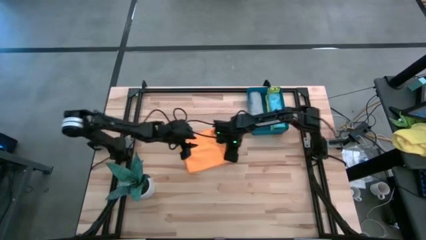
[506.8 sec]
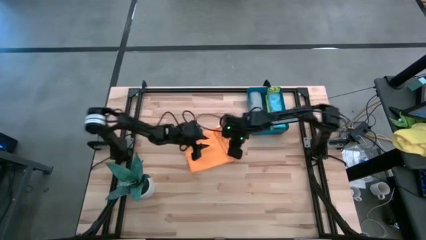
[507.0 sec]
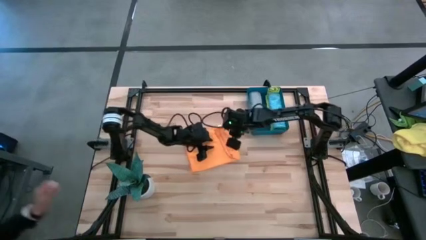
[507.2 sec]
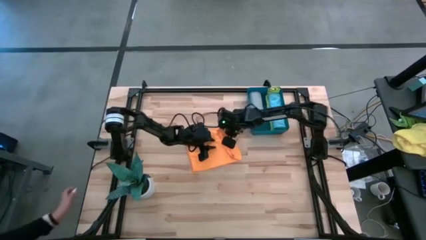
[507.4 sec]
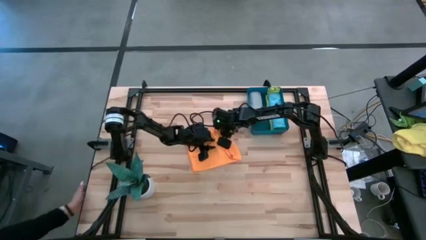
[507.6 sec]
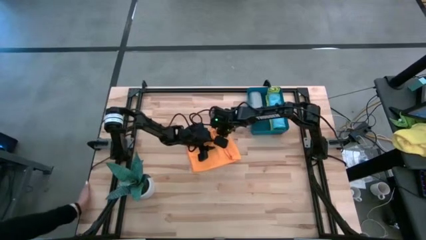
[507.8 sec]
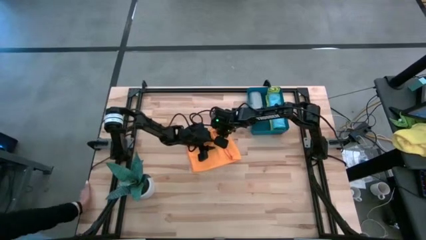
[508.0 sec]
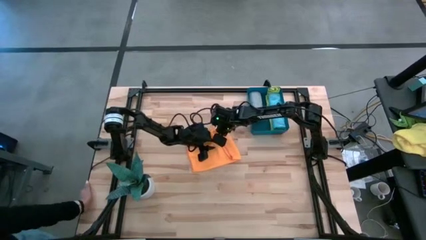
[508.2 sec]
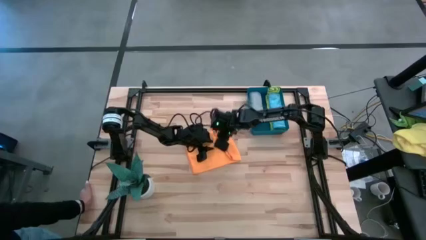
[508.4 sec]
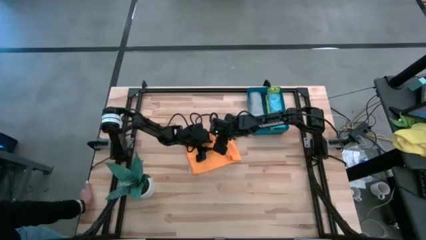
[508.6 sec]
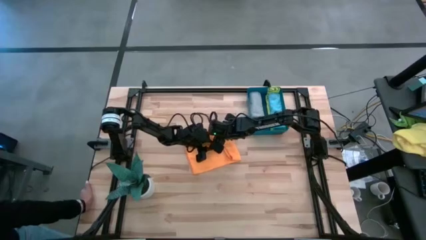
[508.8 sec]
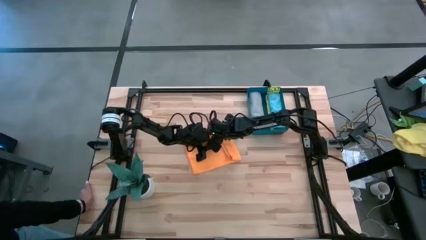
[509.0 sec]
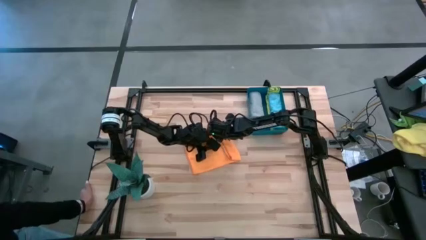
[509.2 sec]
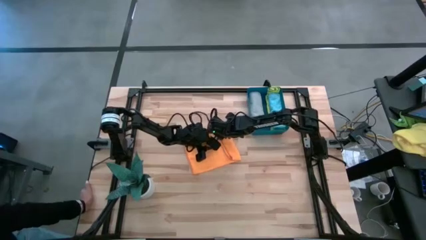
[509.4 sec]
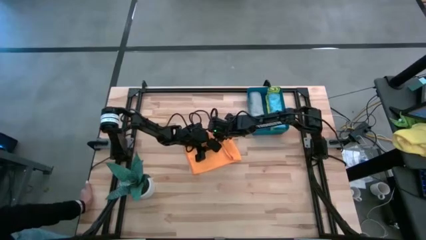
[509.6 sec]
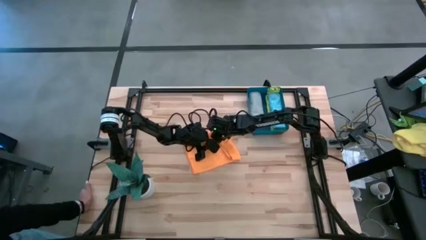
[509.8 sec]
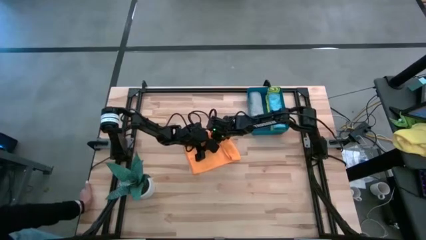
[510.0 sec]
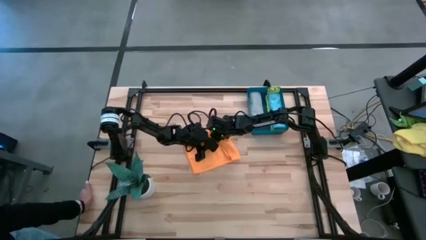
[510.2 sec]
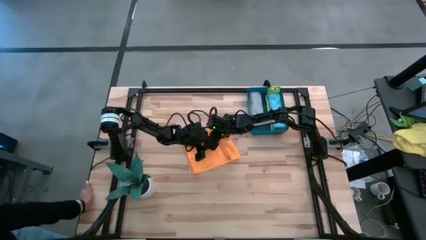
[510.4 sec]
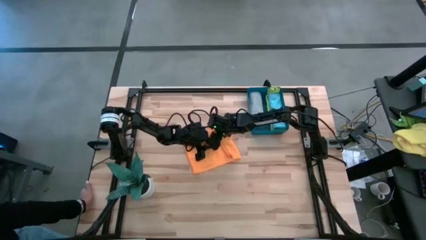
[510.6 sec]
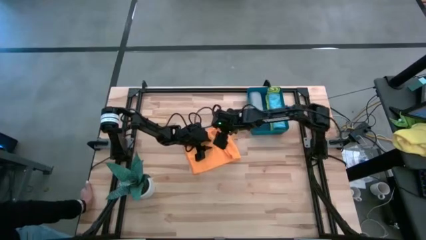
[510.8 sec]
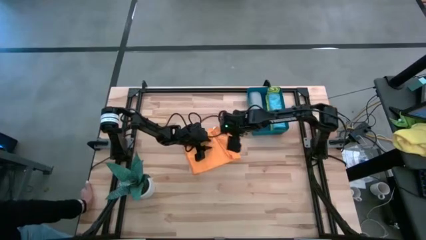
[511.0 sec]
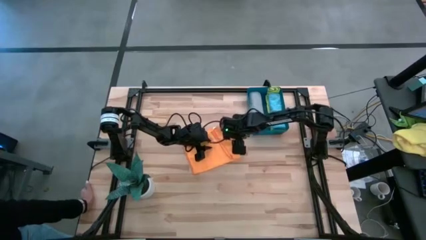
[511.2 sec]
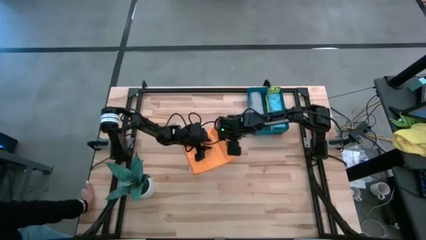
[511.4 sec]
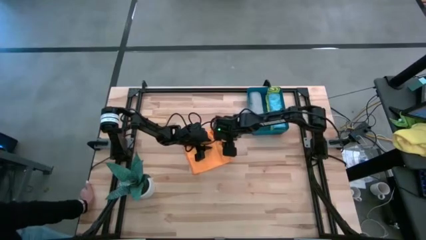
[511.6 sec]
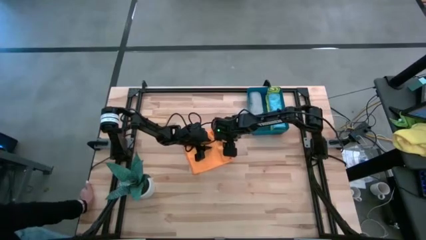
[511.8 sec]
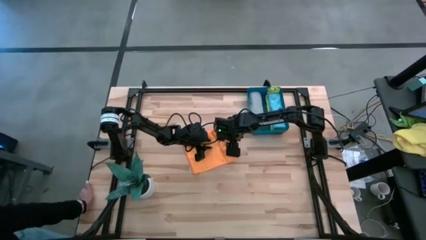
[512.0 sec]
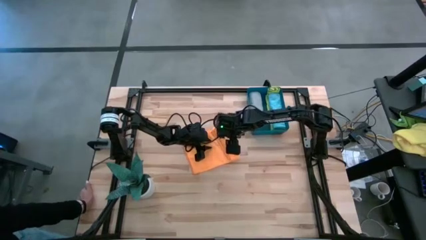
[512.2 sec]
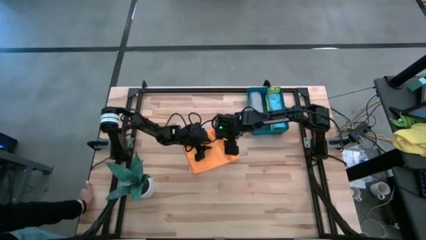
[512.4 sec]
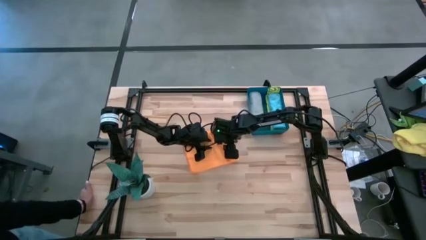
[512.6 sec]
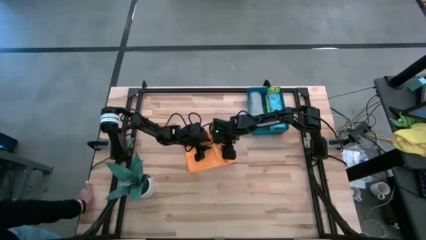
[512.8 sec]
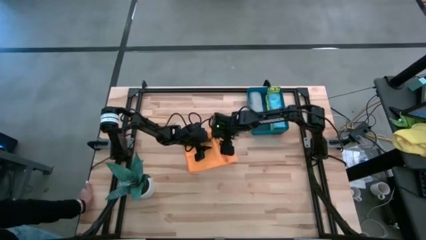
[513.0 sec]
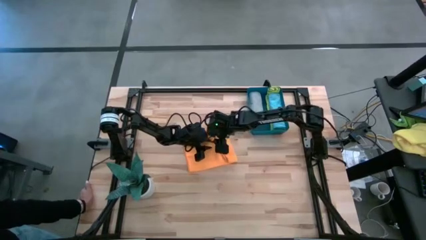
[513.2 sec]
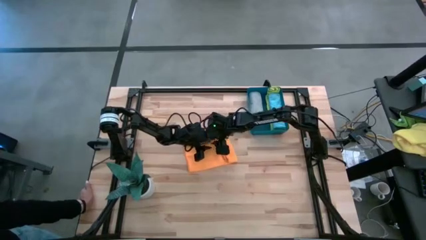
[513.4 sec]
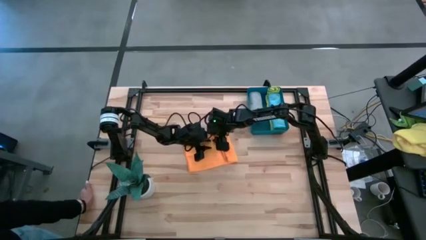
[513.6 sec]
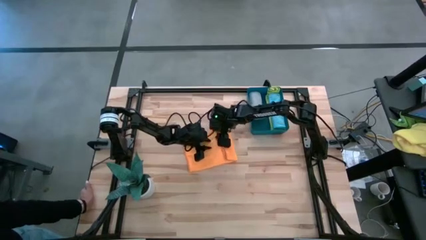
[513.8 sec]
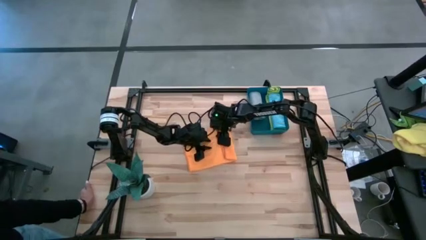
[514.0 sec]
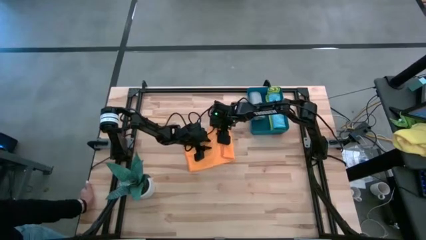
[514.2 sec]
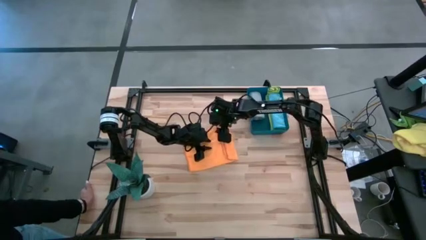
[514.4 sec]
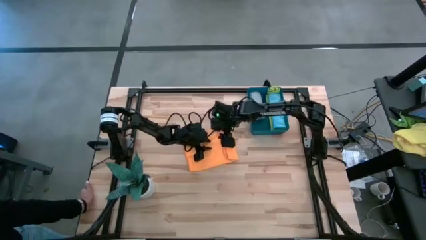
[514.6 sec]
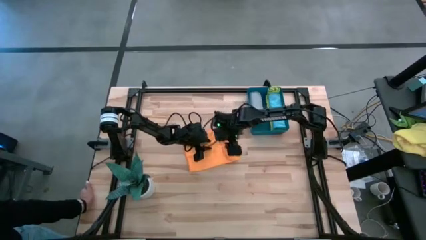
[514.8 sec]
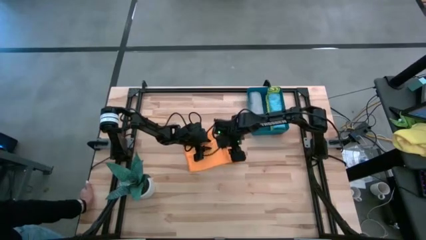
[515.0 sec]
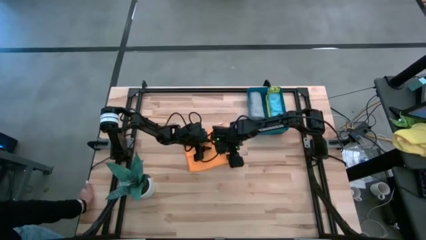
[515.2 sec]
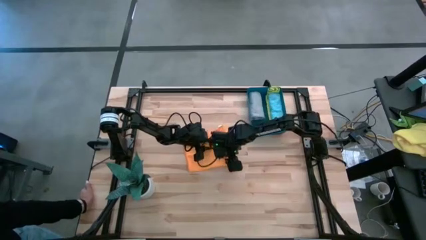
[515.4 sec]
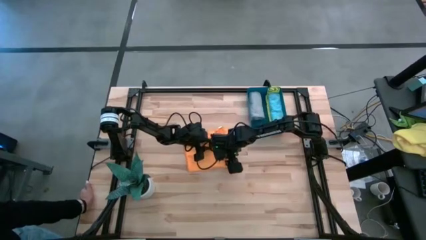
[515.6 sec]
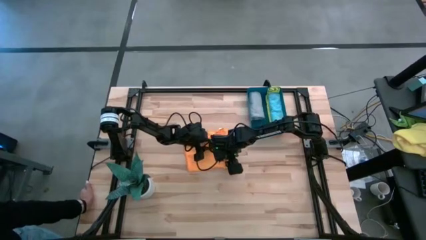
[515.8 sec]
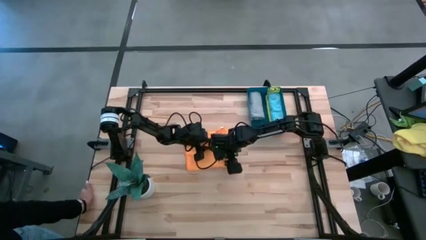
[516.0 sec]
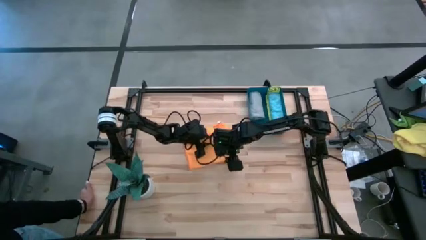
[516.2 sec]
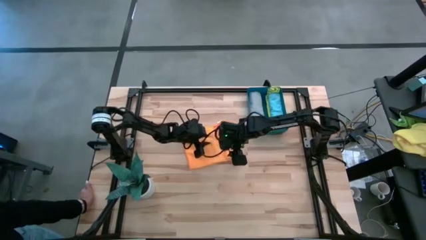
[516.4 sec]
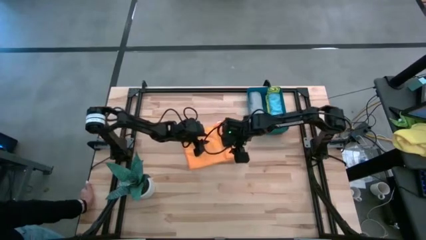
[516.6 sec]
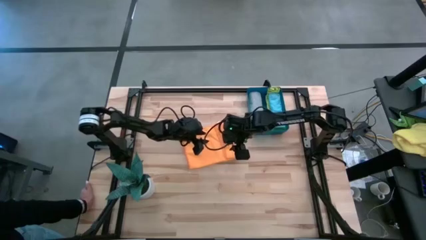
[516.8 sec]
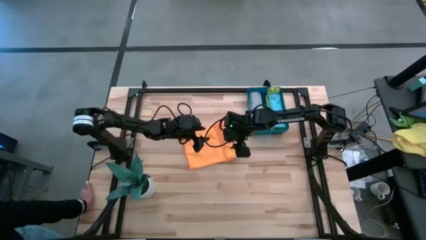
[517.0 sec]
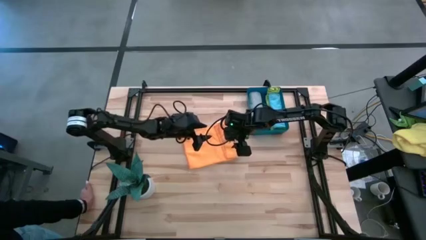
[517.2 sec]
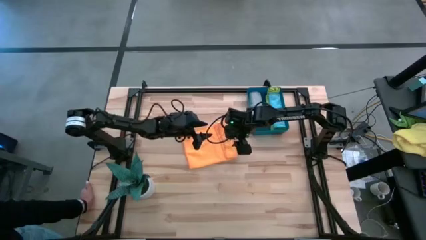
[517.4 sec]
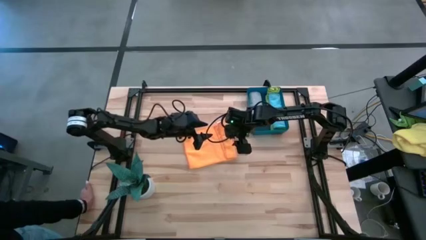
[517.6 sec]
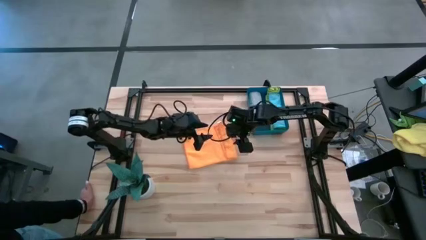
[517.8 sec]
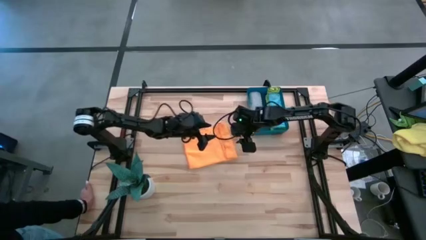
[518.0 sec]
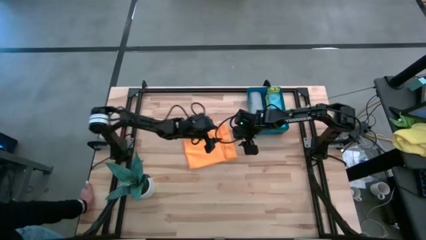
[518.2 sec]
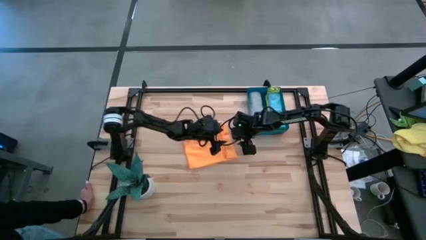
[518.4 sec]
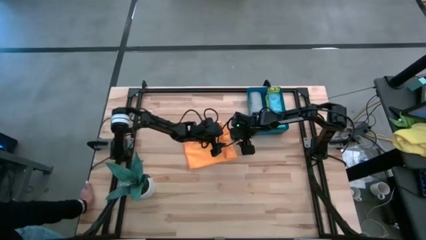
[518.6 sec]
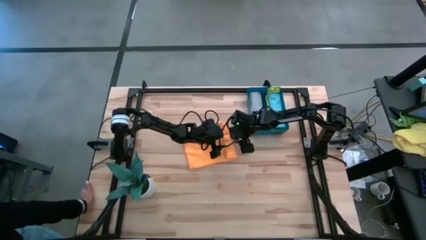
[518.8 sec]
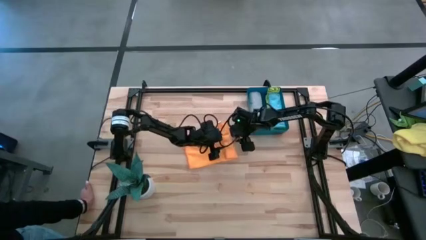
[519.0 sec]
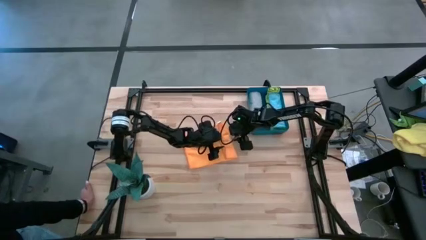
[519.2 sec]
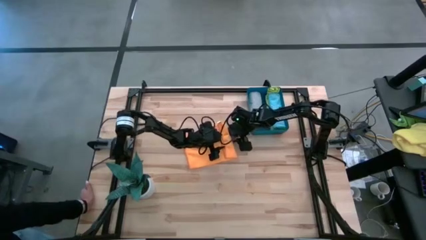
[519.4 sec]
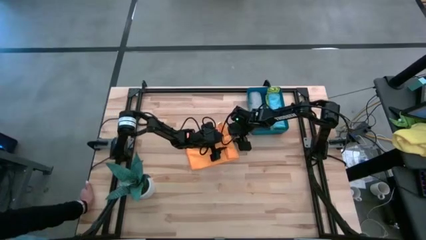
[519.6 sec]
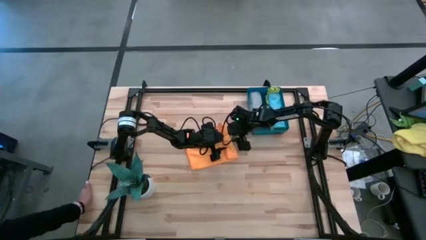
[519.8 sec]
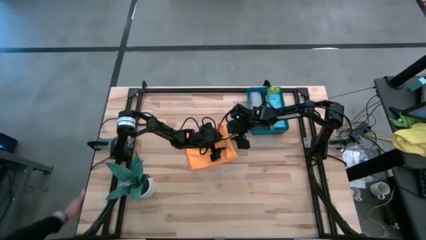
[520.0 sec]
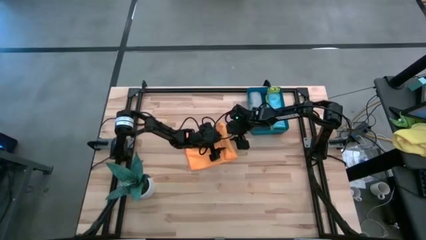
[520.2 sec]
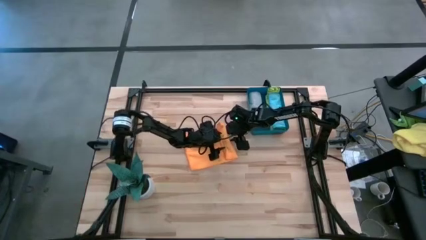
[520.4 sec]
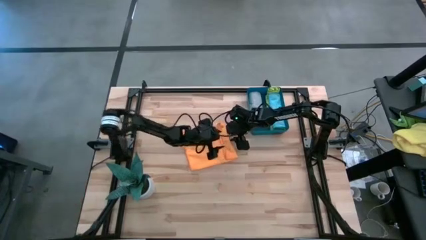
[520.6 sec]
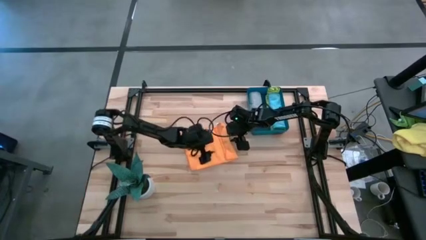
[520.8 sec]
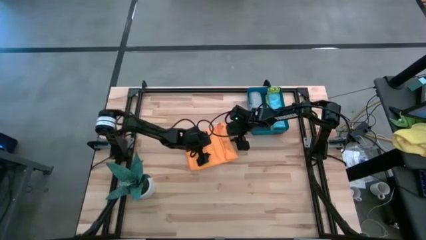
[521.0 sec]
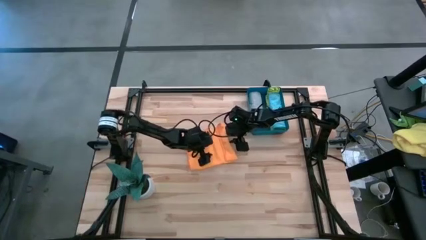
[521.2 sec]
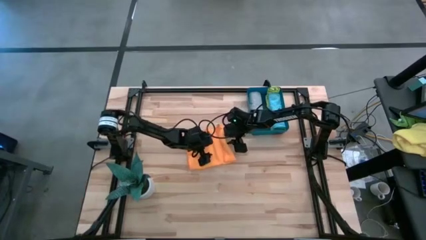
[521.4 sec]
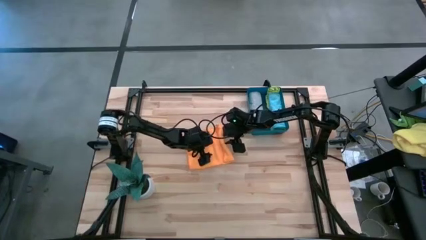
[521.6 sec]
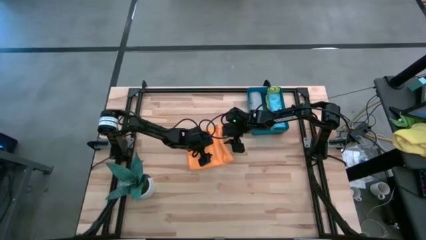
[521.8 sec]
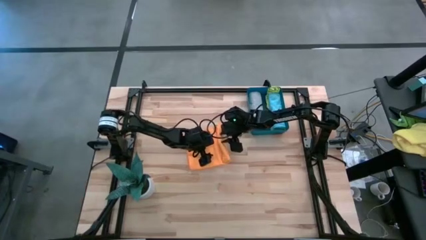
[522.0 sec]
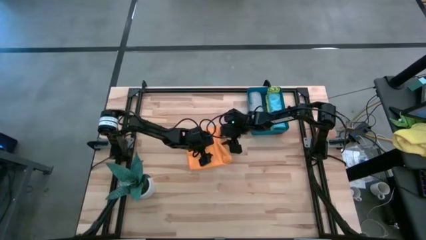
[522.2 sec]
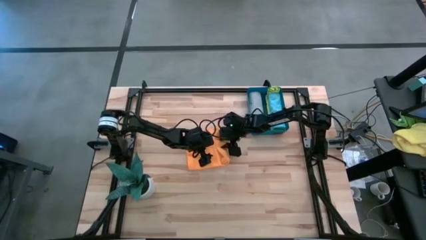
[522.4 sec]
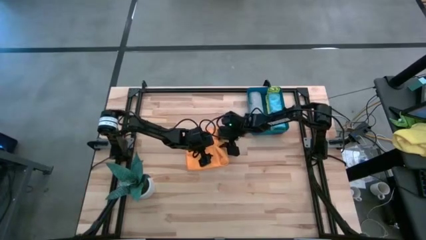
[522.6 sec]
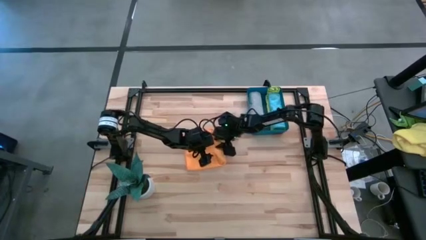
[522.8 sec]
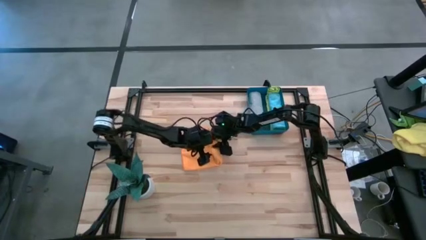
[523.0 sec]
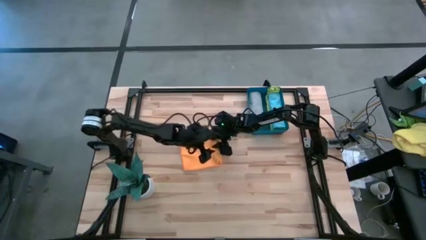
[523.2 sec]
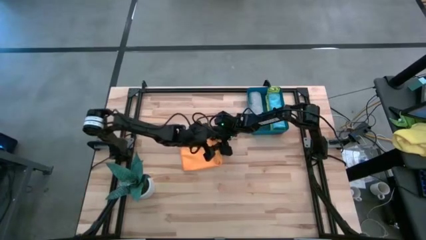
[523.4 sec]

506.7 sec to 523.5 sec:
Task: Roll microfiber towels into tight, uniform cylinder then place into a basket
Roll the orange towel
